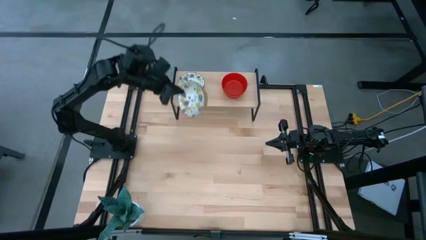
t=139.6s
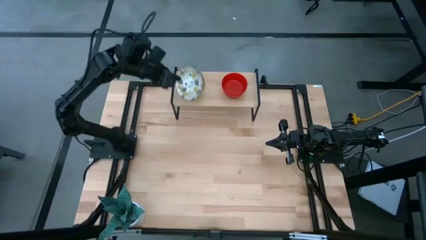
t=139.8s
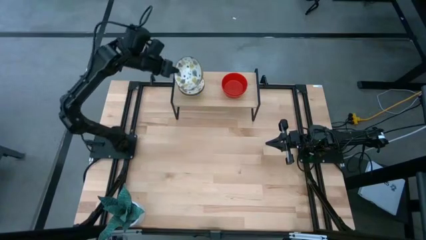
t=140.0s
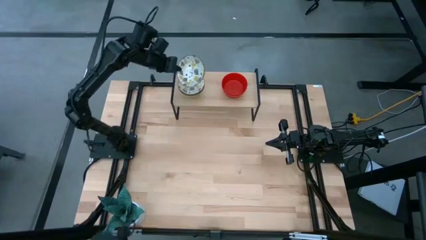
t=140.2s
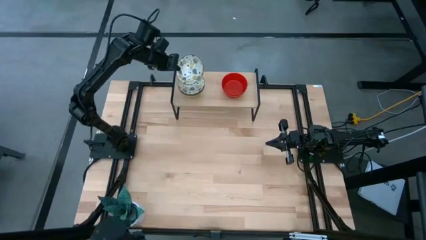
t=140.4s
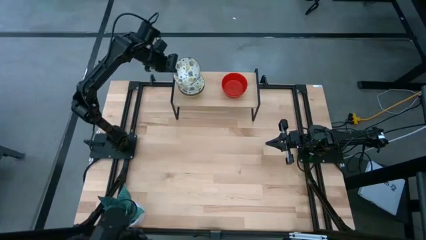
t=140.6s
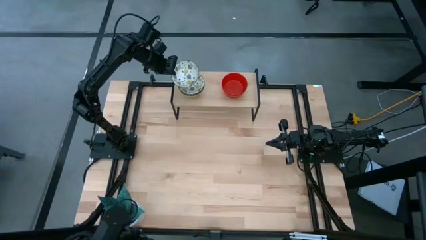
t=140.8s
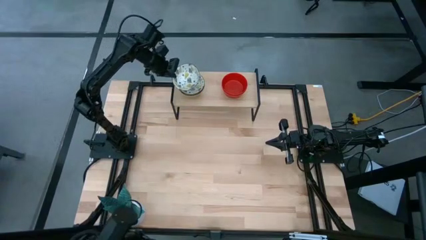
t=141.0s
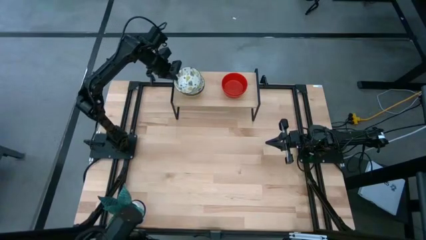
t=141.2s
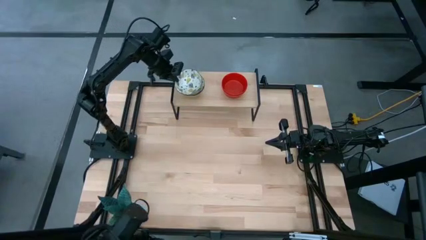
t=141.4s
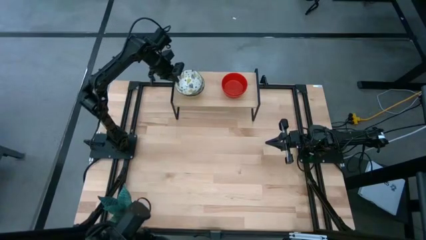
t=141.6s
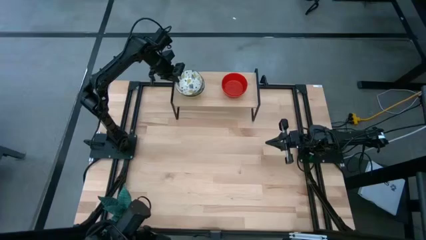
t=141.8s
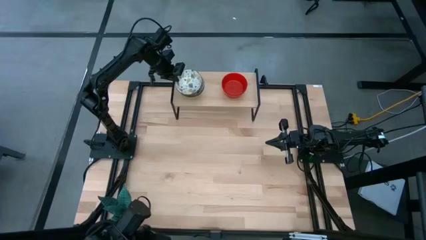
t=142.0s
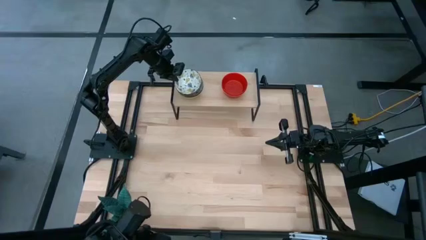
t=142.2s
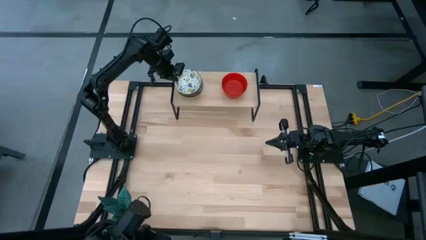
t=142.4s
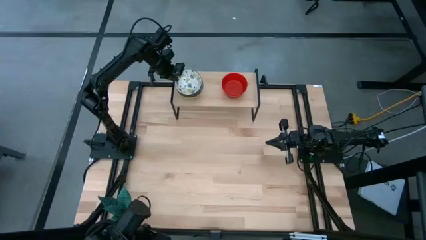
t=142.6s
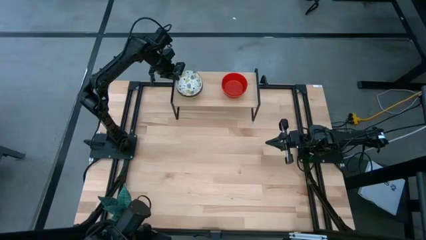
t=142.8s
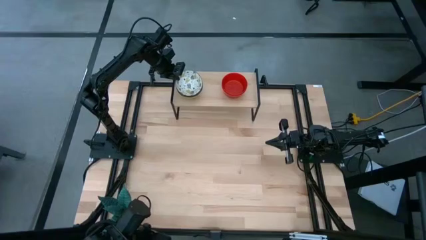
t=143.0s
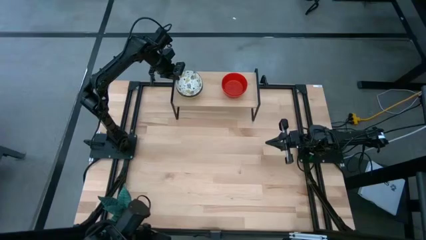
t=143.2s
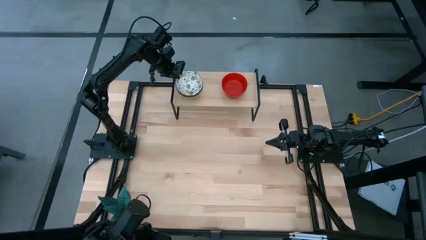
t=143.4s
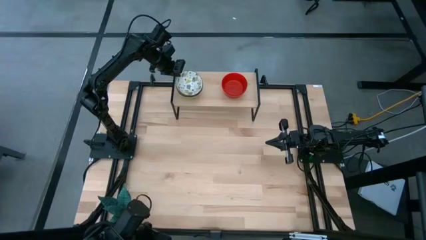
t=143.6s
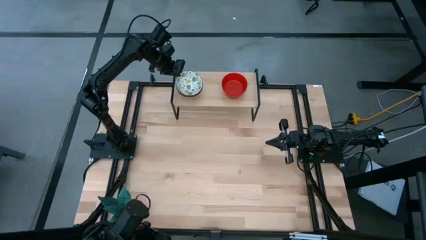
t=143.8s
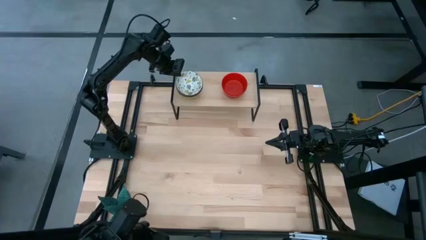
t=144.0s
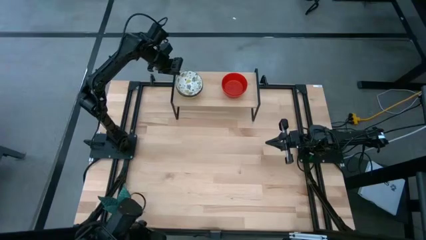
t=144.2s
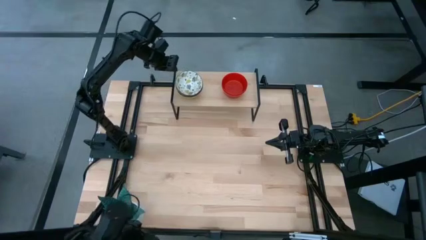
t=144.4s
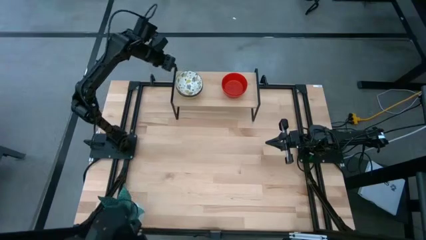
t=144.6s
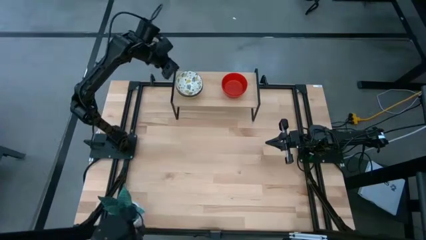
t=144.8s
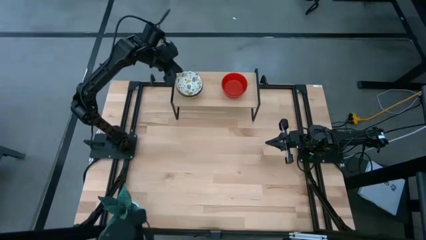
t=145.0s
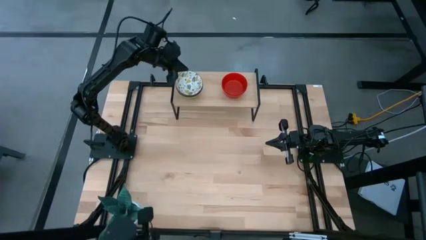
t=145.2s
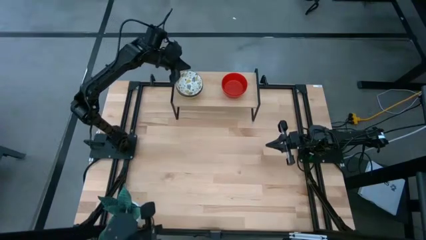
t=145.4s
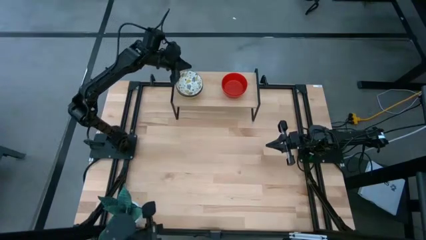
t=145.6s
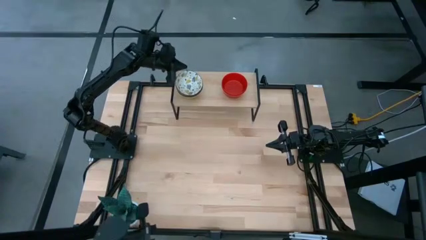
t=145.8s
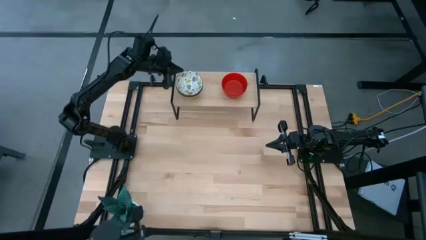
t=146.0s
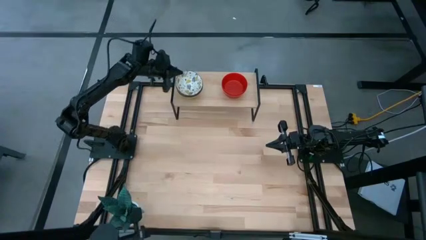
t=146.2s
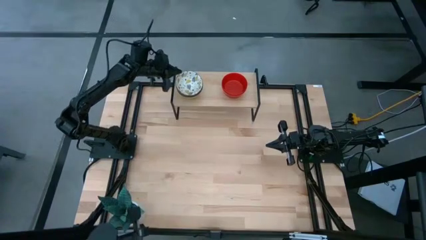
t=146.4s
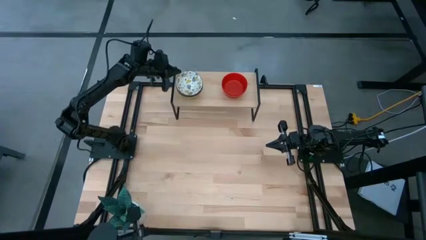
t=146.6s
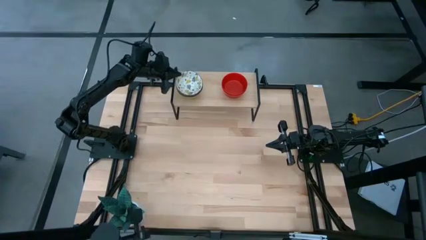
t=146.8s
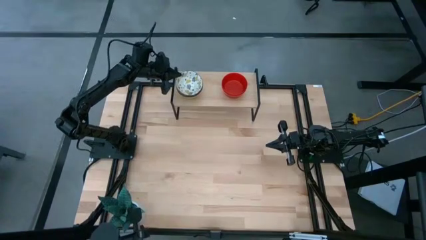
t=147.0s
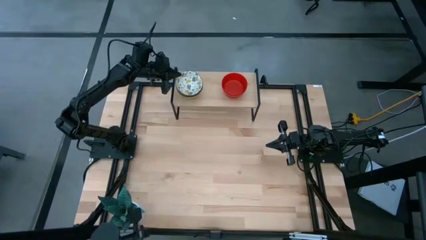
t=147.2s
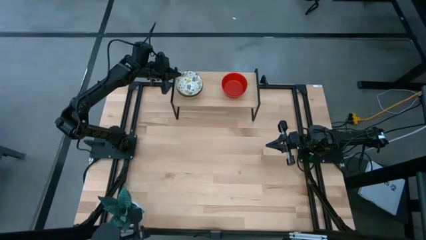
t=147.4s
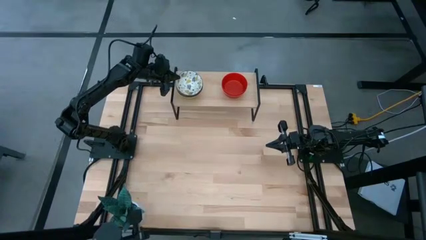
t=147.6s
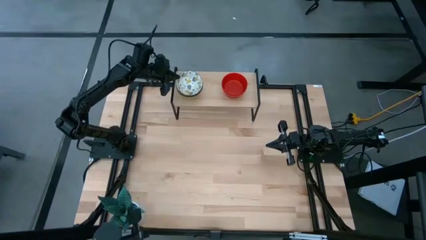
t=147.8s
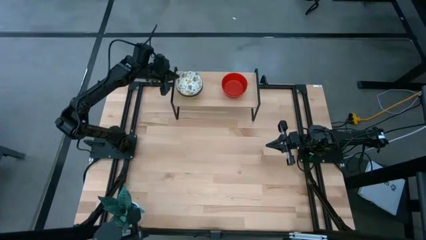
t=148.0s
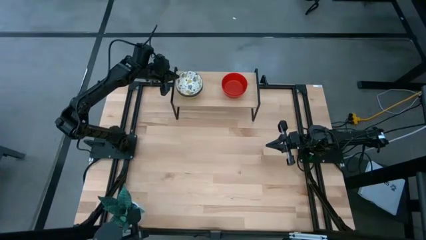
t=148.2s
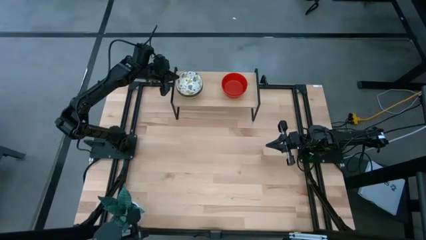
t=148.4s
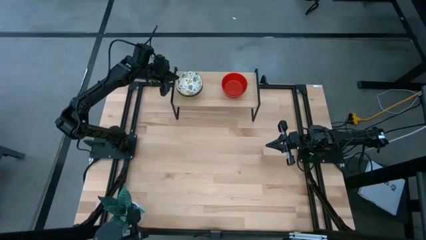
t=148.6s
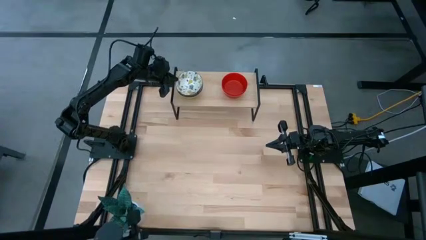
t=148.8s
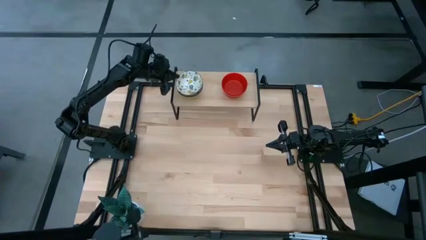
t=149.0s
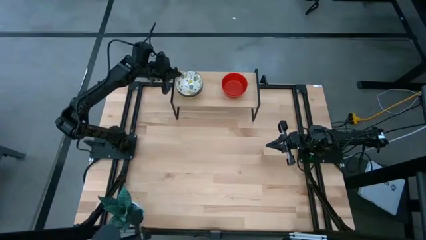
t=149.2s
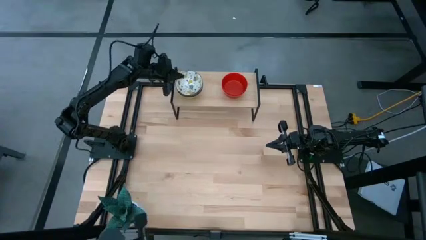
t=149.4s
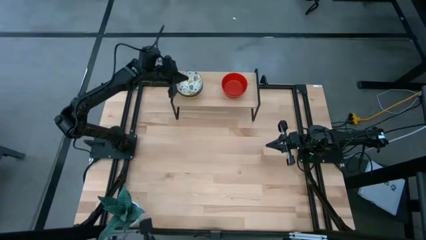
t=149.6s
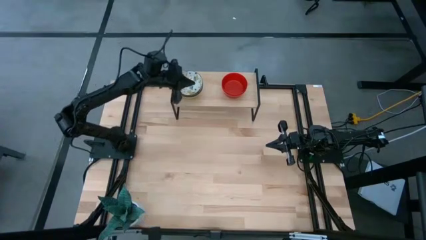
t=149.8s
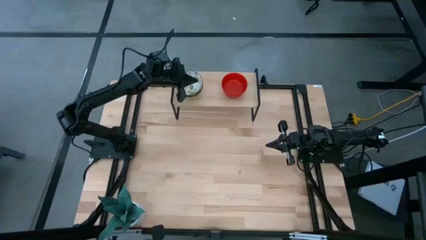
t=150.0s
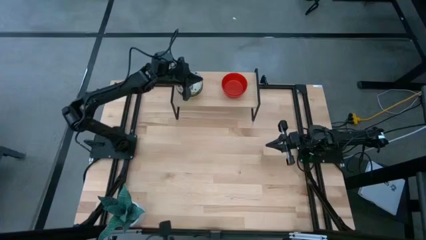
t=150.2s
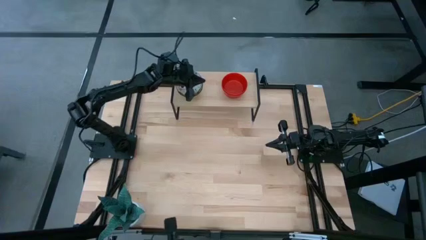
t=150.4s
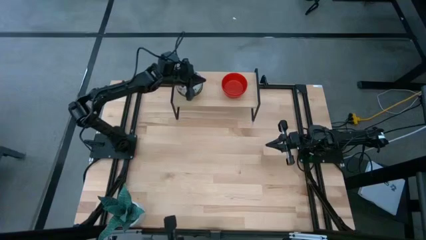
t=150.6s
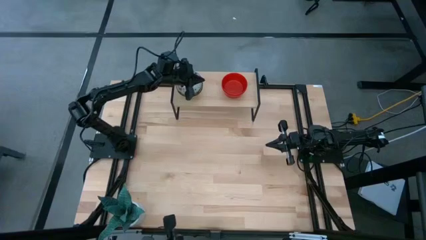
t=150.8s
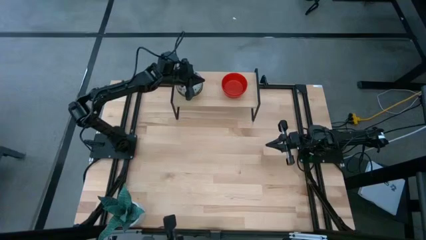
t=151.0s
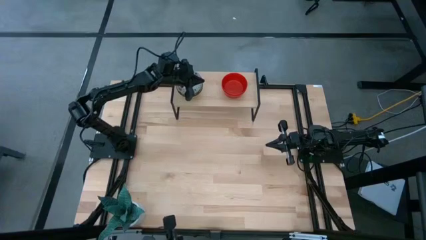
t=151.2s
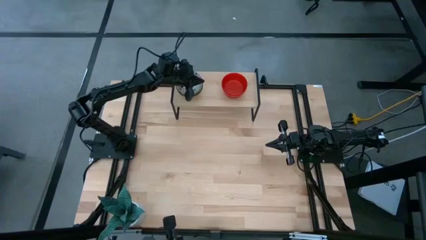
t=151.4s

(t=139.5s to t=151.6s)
Task: Pick & Place Mini bowls
Stack the white patterned bowl on top of the white patterned bowl on the shelf
